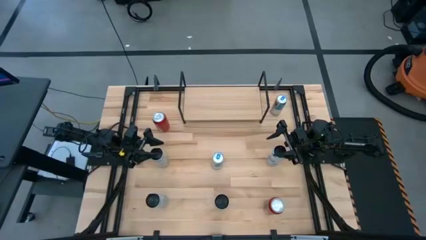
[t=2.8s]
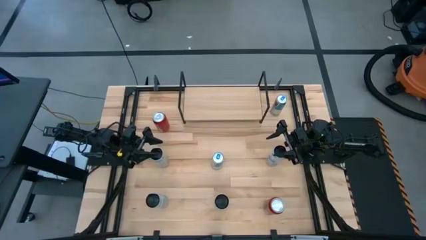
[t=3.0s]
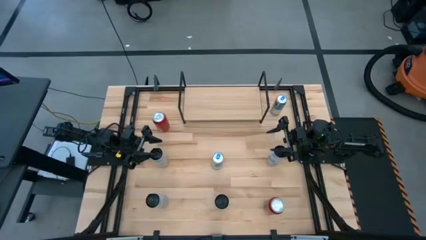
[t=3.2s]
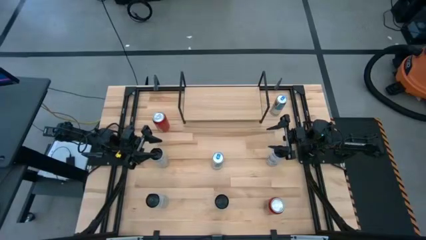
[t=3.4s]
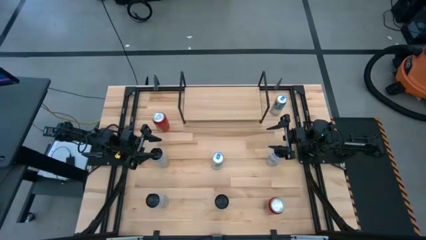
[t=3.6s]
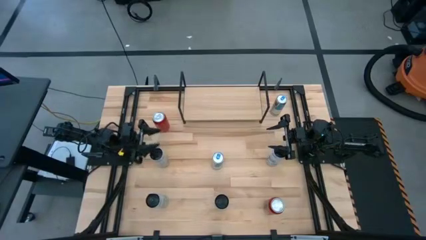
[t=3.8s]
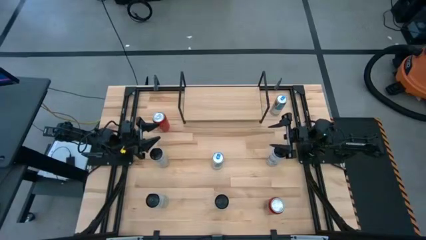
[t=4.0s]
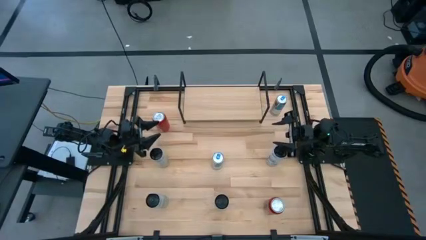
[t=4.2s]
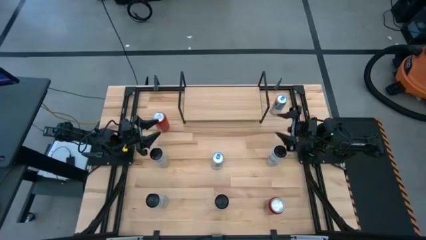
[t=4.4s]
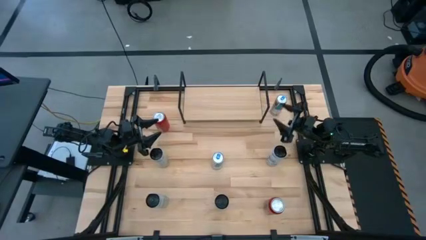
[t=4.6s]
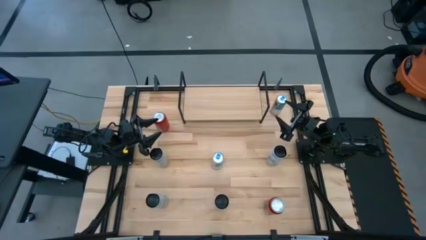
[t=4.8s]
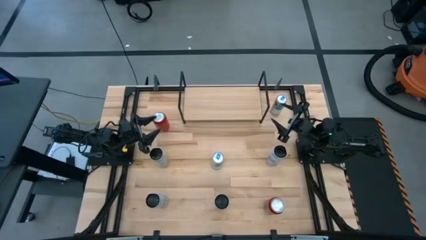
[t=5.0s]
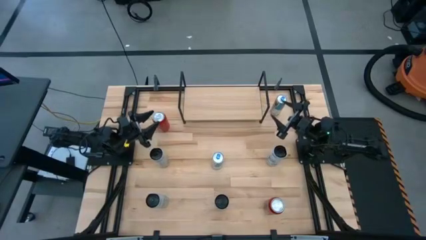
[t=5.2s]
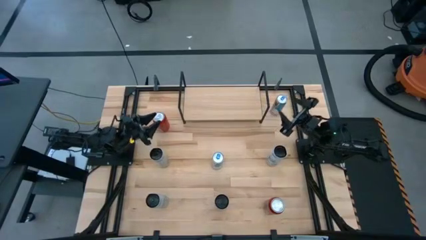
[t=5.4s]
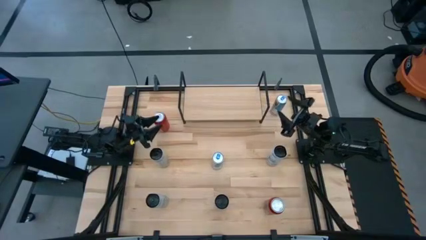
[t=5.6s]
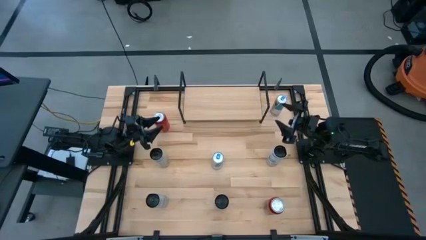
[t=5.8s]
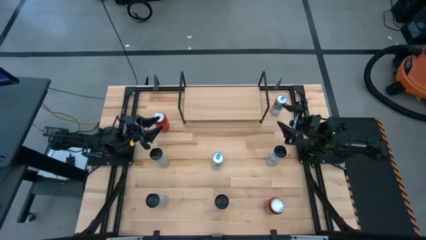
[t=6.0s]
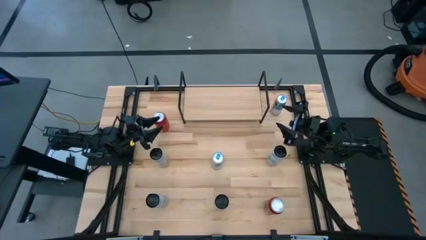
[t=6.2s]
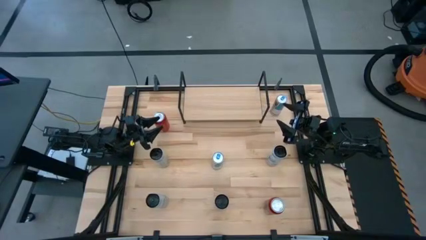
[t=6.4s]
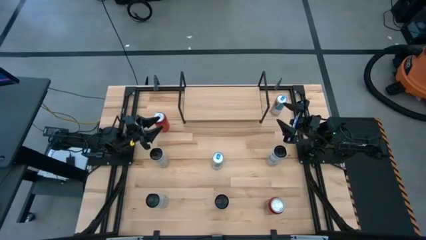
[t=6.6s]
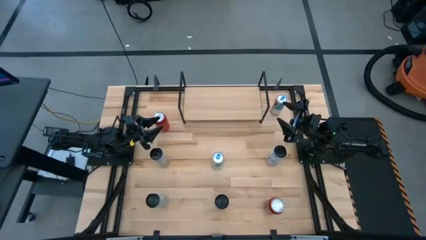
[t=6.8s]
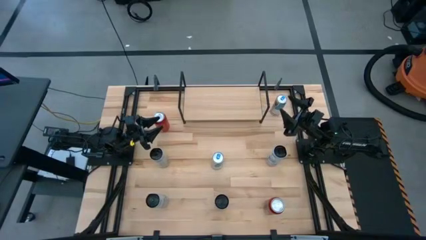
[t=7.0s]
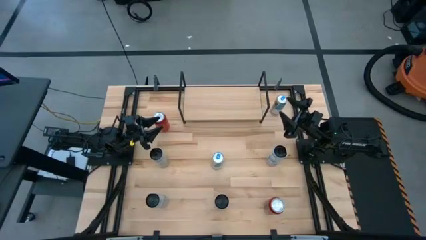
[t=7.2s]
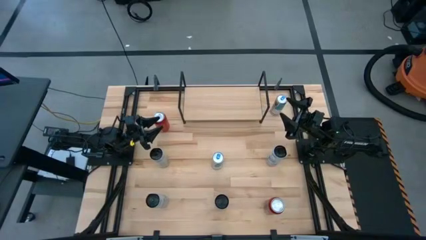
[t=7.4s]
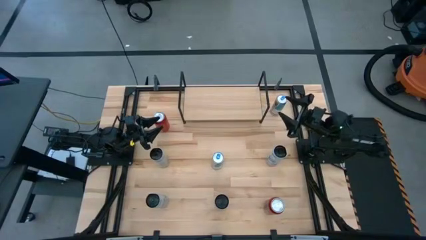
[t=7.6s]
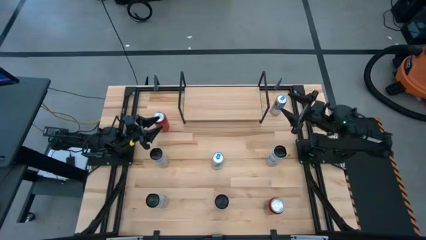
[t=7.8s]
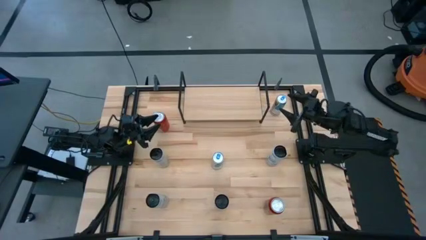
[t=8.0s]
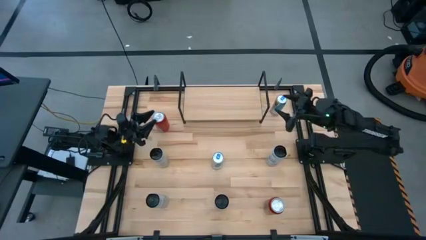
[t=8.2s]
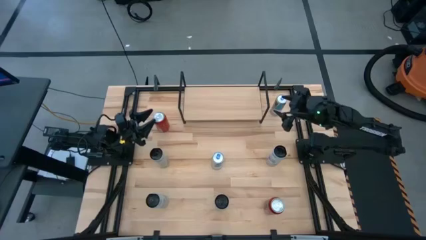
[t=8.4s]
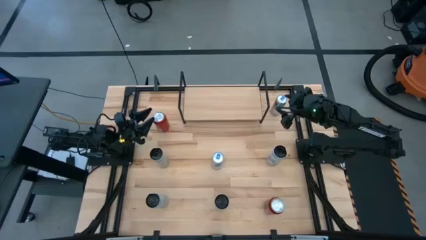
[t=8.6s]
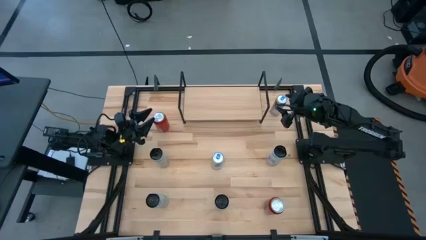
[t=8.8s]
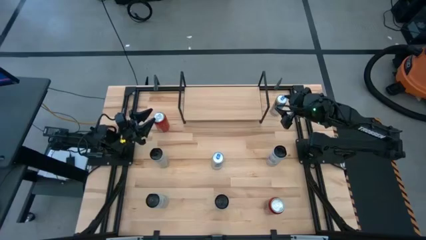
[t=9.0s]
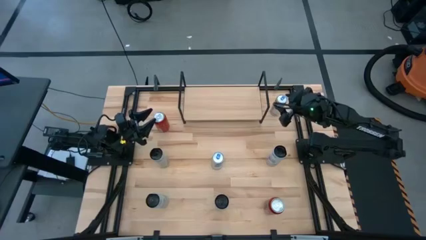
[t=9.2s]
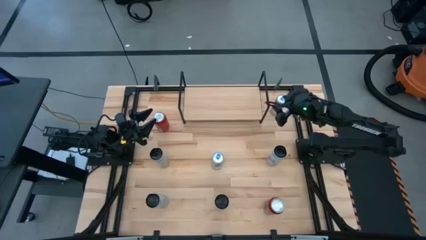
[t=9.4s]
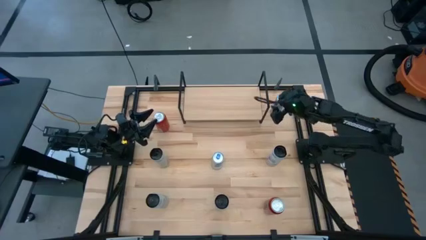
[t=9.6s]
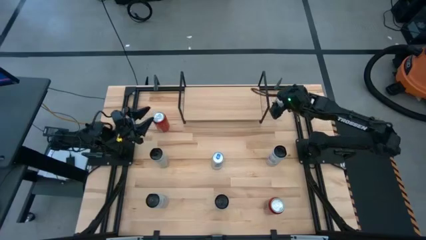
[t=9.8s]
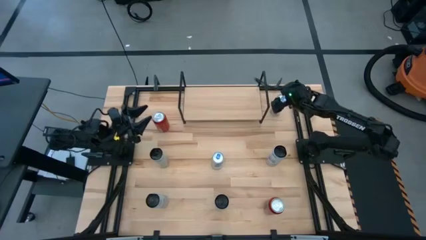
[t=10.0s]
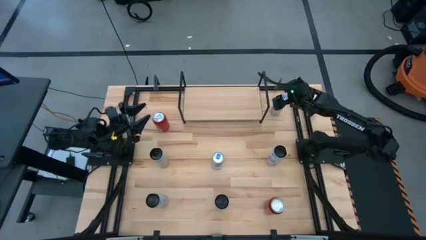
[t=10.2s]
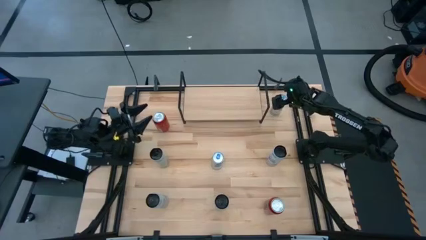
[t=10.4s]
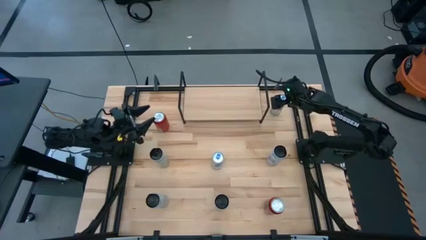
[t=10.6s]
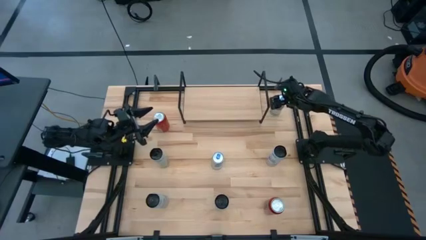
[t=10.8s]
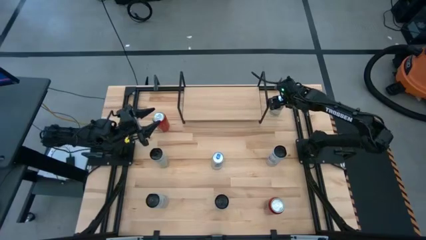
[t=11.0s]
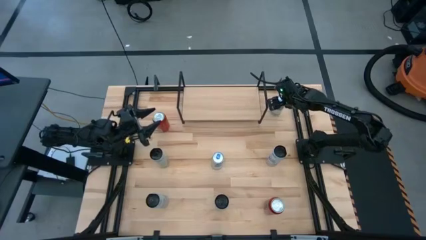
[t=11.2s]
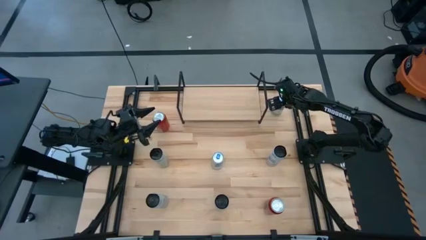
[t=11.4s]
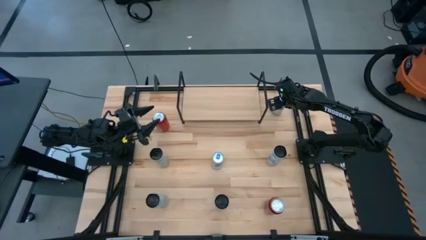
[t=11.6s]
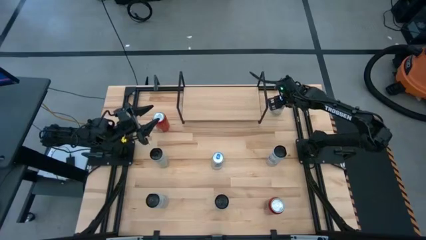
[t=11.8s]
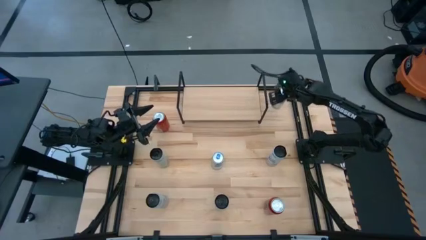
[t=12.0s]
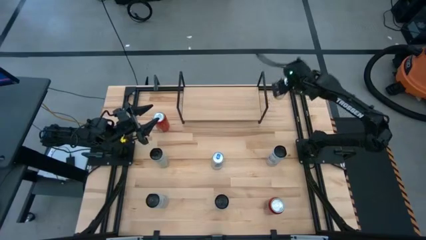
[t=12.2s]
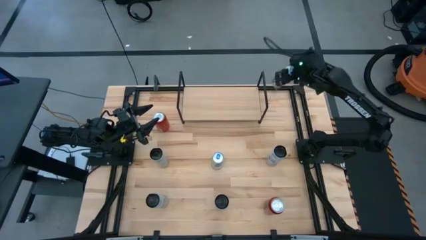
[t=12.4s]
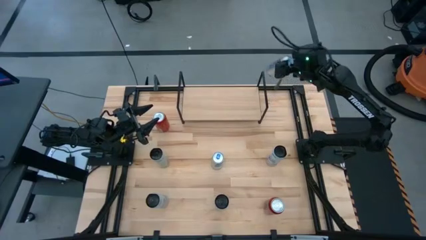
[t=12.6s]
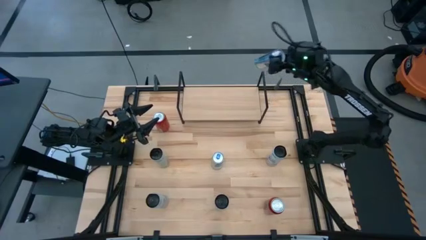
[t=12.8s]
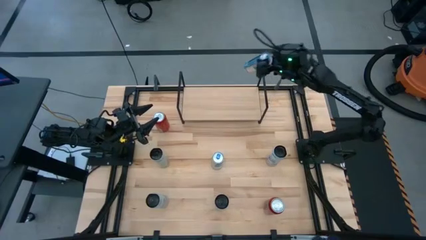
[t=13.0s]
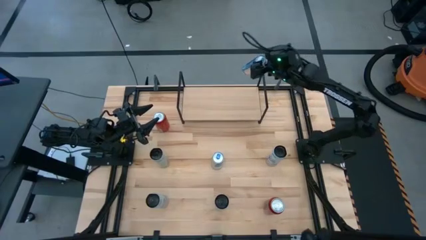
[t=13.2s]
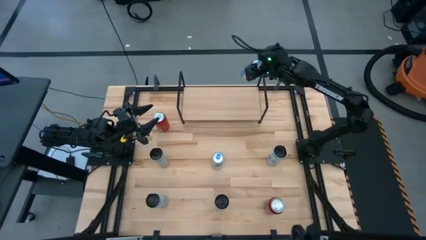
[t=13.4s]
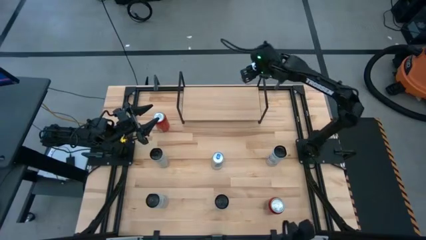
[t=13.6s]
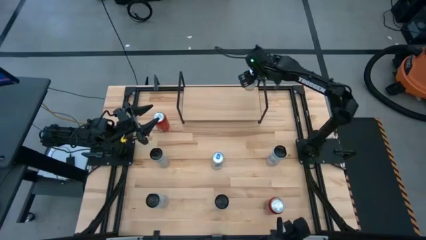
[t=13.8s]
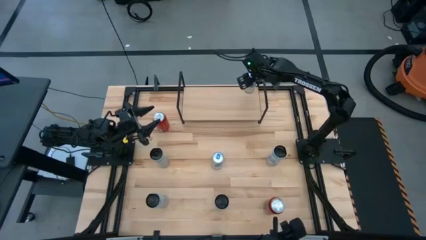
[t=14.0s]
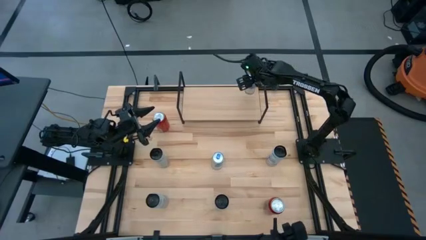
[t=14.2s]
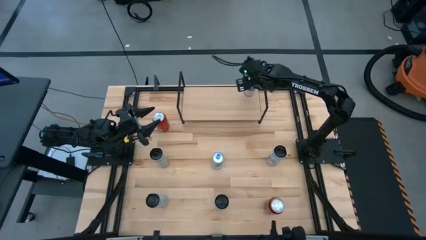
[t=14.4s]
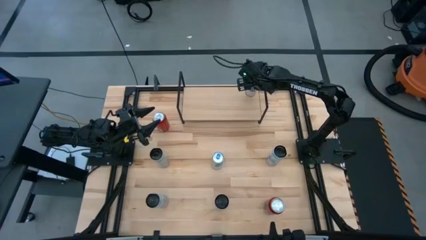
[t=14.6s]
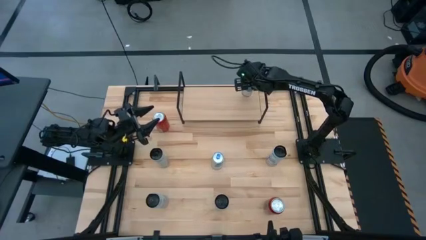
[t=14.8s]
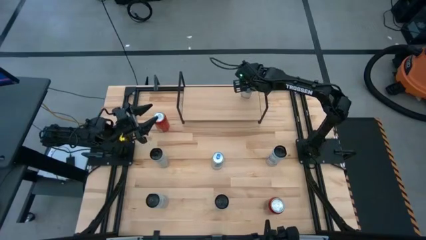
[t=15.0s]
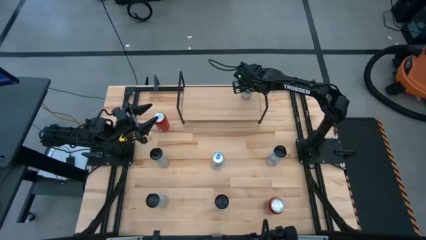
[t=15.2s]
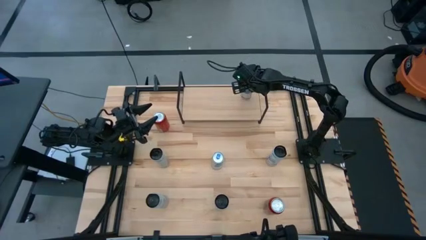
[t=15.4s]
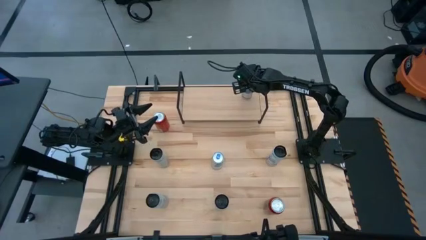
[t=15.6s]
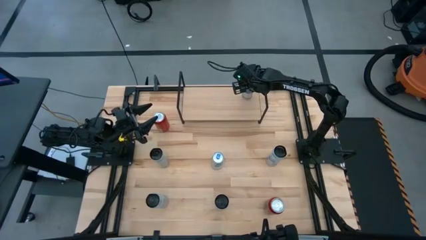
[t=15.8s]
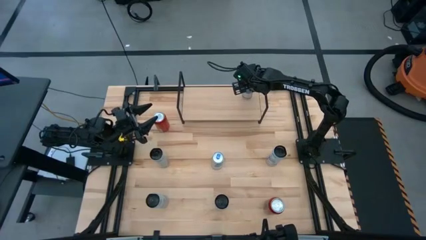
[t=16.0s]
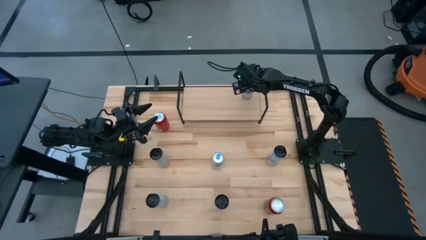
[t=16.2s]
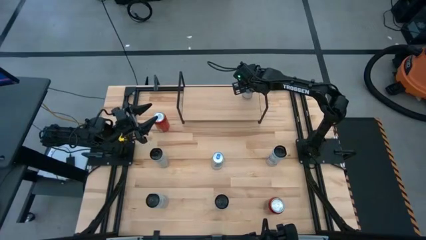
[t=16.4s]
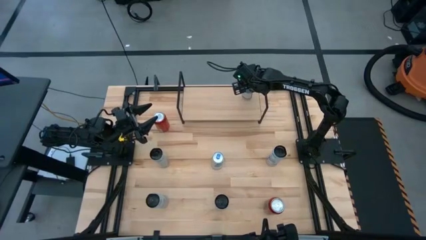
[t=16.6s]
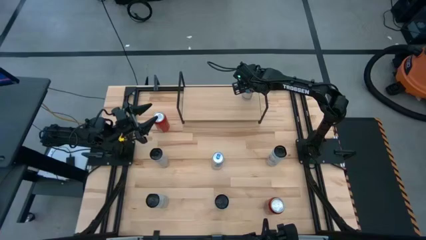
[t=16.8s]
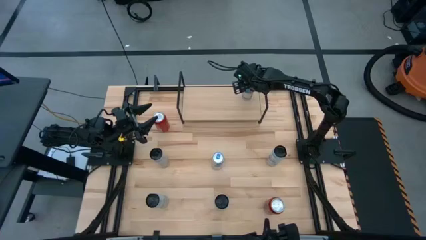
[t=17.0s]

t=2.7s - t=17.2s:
Task: Place canned beverage on shelf
Put the top light blue soda can on the shelf
